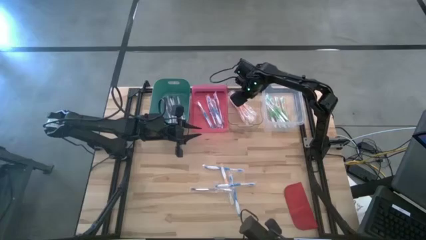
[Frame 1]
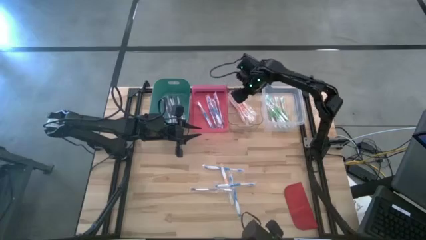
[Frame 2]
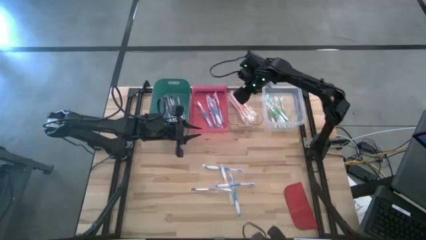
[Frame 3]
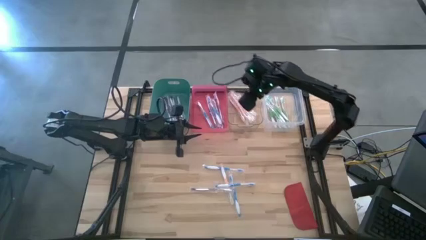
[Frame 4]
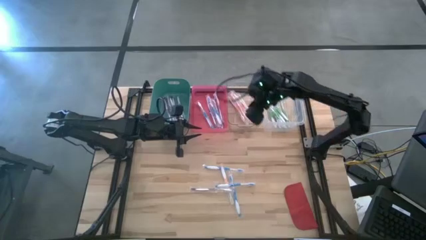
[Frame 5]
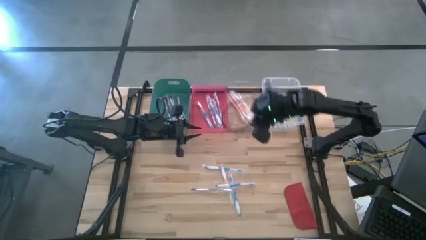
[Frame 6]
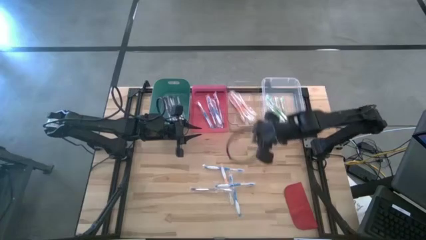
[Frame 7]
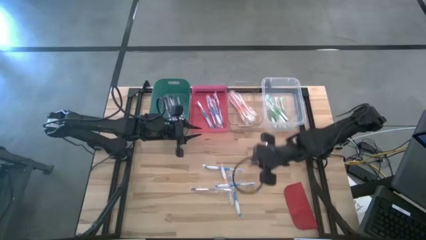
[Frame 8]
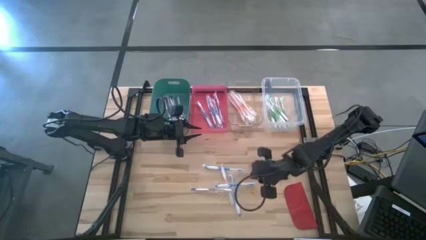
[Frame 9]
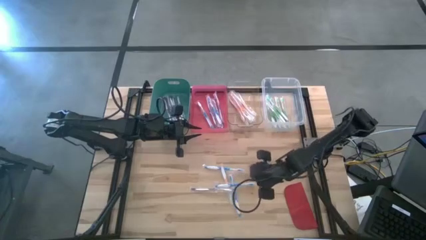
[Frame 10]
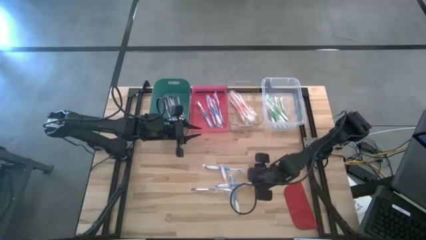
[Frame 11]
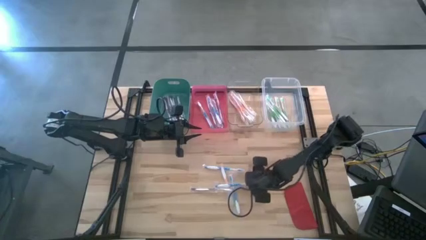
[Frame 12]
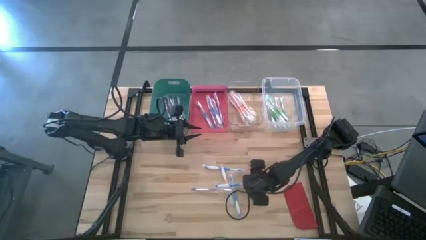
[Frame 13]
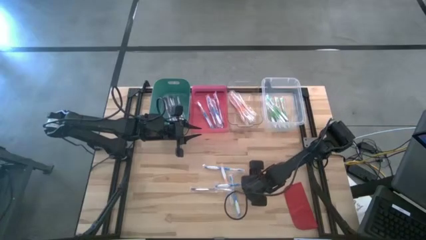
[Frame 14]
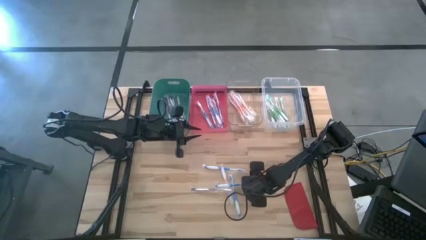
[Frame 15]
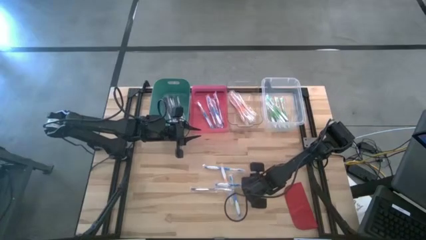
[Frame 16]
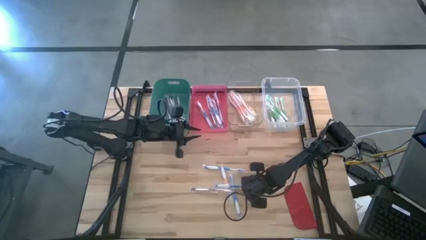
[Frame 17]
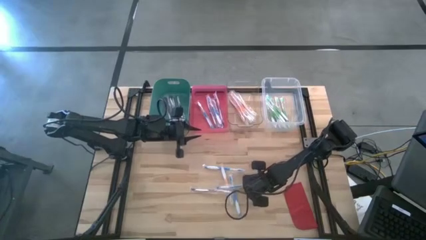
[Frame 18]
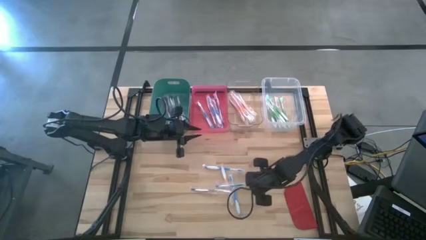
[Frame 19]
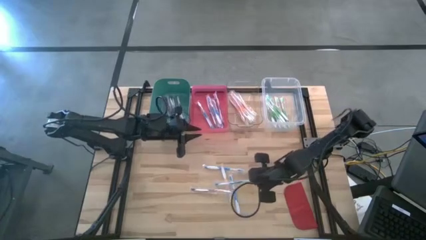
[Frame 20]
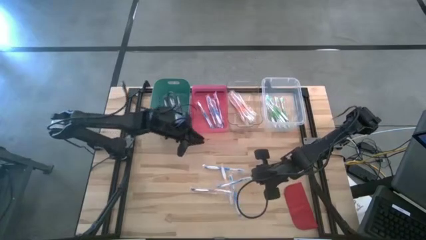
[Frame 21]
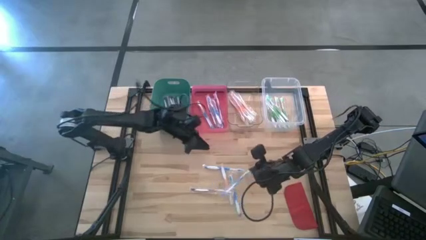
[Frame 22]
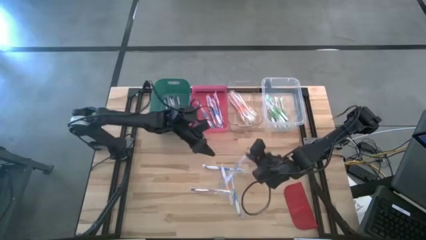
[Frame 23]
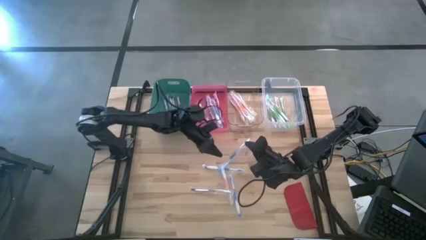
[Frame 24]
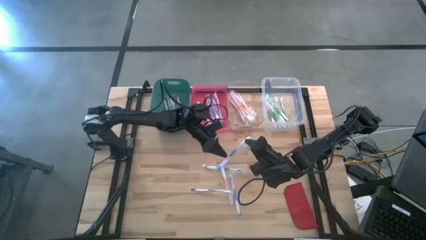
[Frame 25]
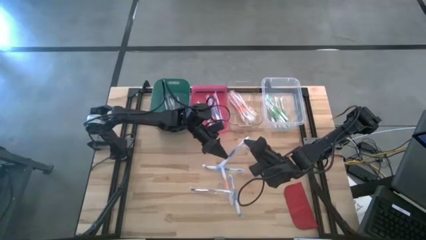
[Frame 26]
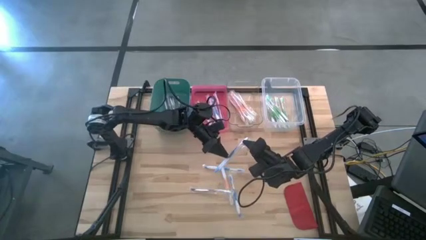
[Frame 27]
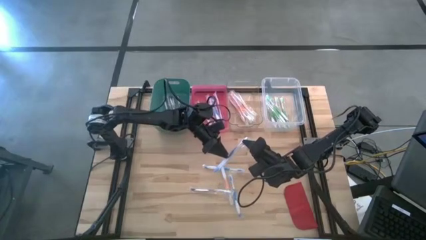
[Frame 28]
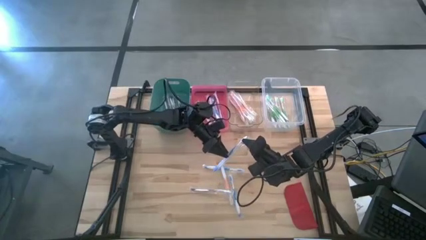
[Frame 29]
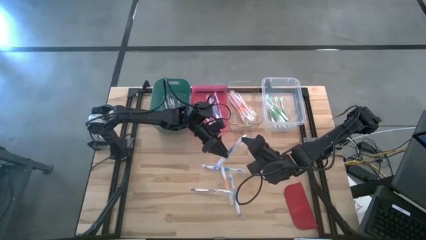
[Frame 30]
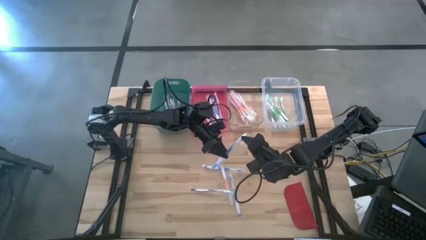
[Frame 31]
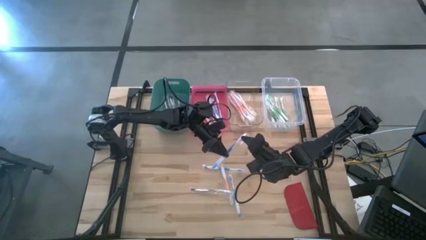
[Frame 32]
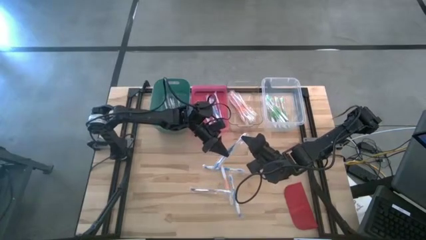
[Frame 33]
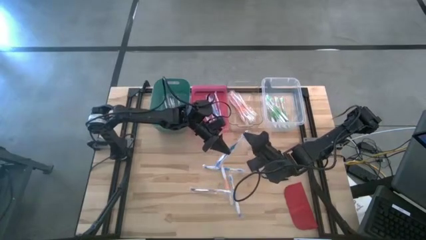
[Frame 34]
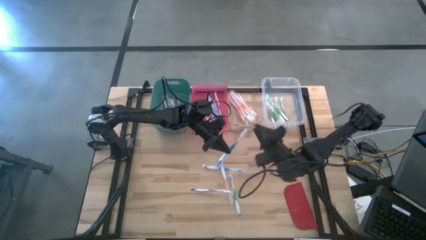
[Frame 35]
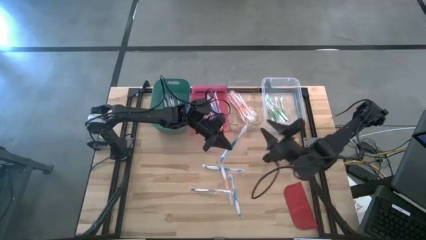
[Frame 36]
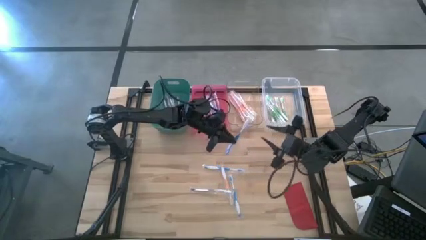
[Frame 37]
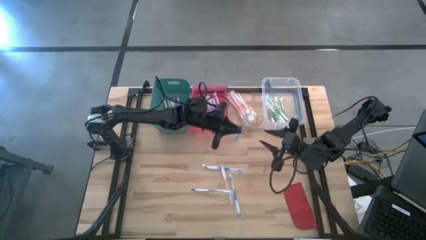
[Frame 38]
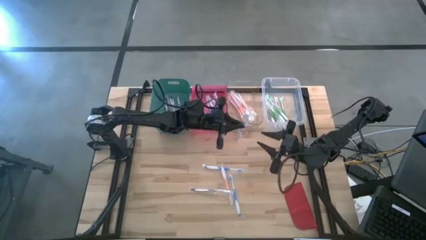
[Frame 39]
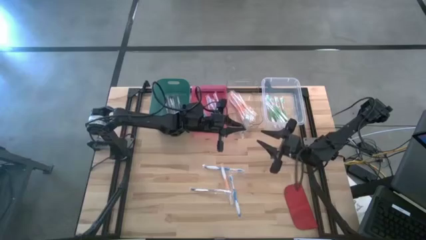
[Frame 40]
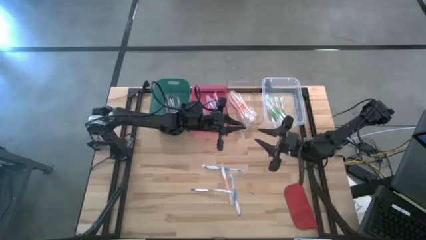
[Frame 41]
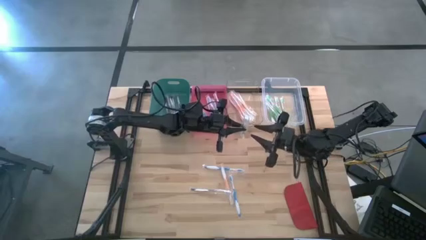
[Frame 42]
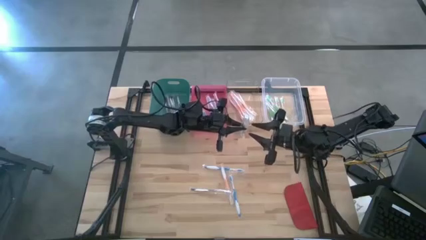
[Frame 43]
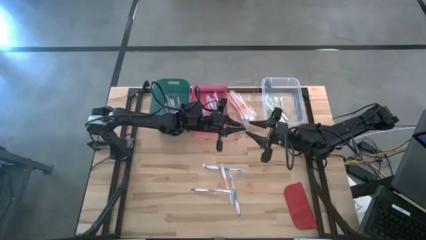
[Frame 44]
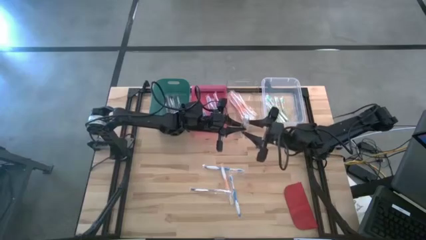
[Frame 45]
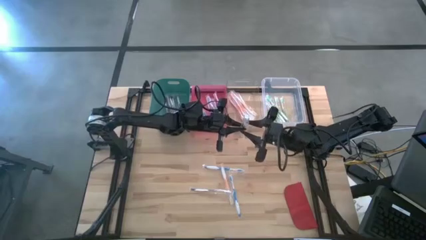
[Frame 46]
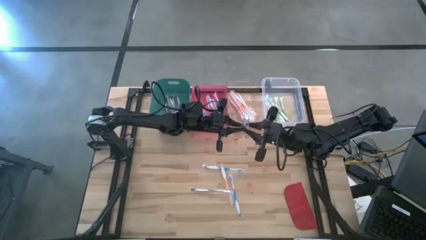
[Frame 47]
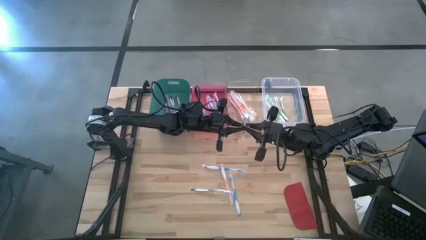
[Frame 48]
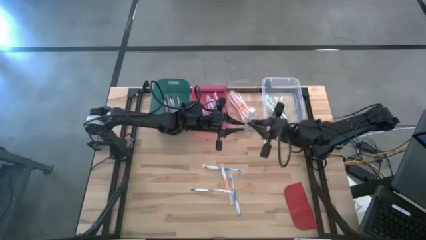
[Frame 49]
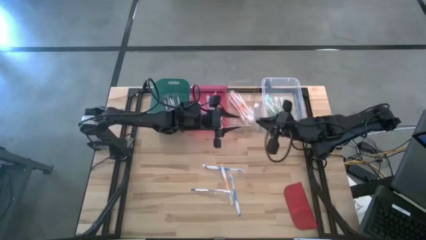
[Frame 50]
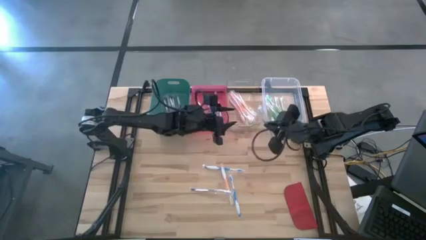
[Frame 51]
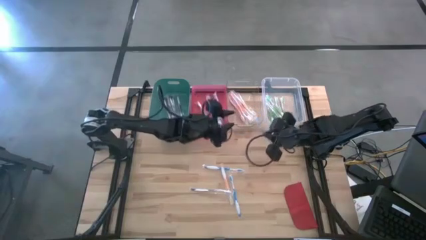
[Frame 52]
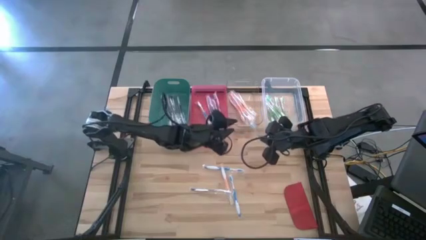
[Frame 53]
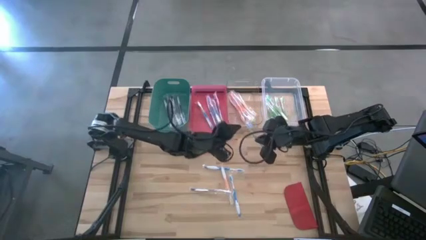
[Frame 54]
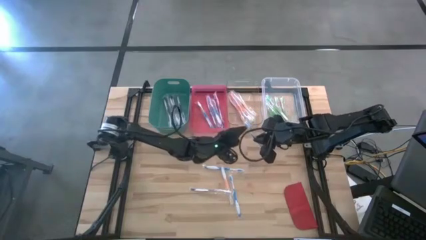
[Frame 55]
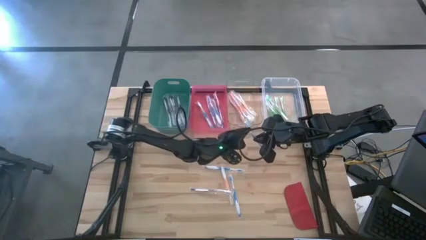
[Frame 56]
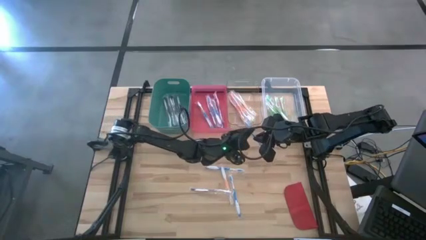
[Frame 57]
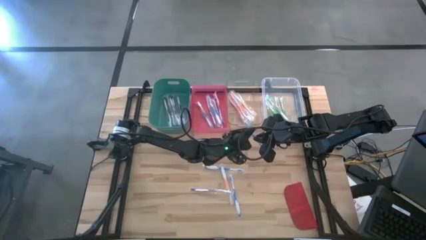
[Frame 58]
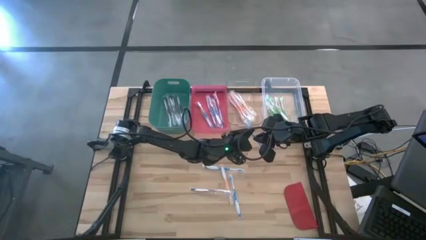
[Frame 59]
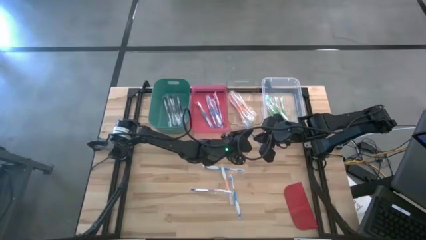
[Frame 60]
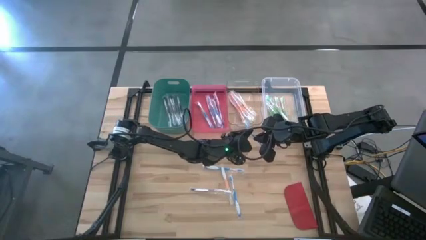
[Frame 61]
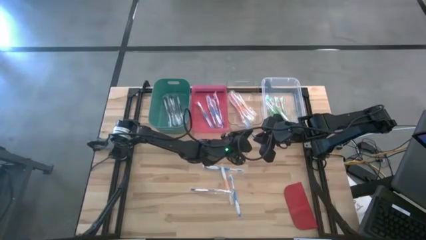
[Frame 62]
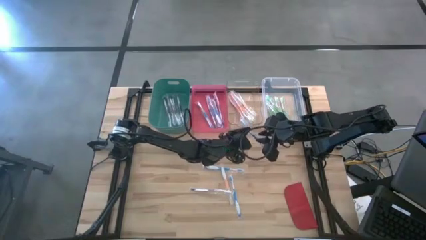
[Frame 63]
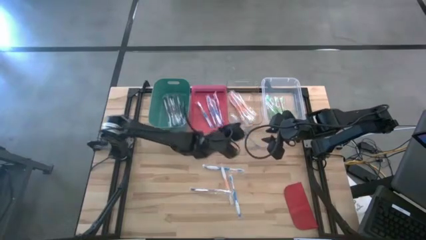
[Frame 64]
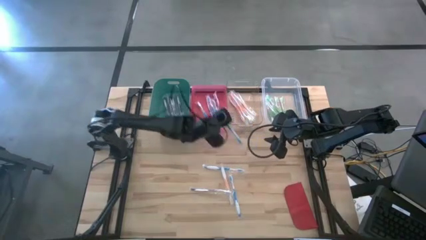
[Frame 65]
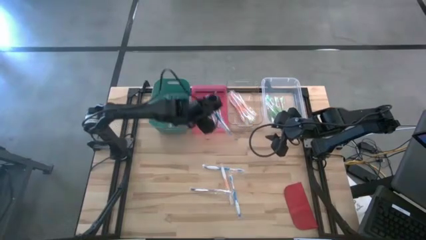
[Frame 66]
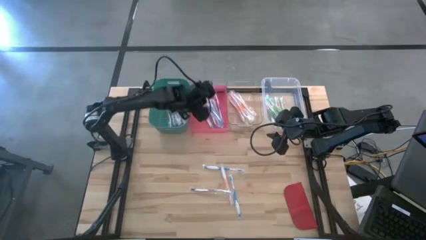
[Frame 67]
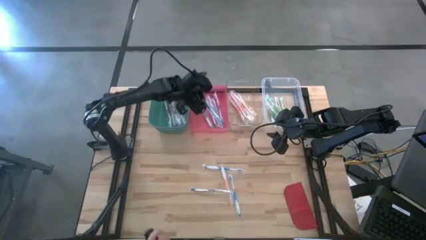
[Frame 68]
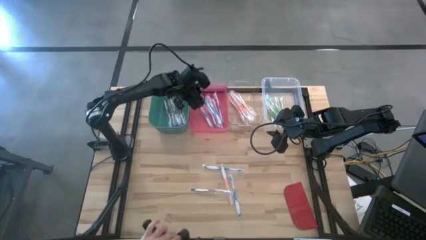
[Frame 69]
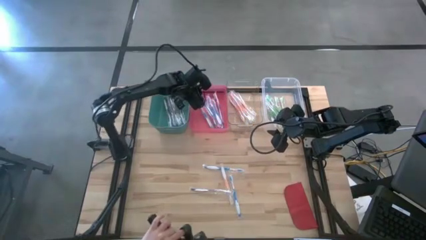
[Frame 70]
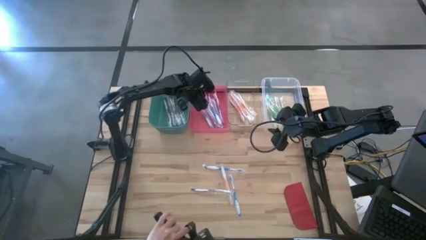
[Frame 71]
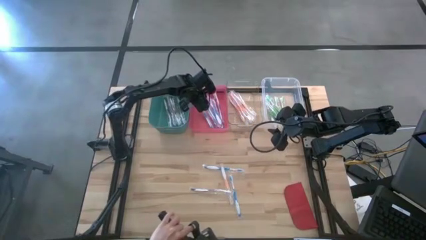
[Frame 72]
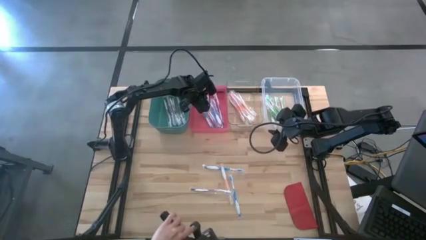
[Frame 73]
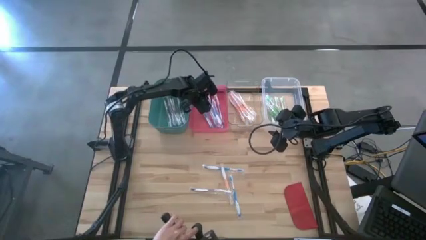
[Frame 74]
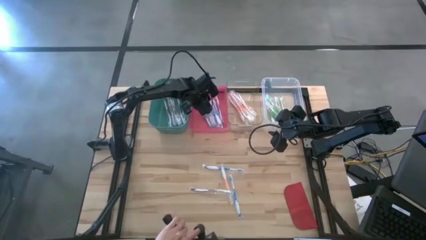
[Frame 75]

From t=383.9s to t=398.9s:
Task: Pick & Place Toothbrushes
Put the blue toothbrush into the red bin

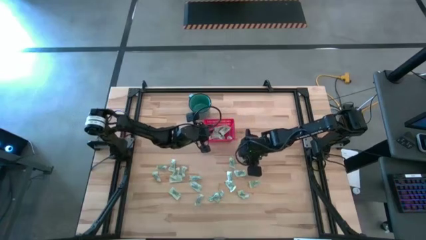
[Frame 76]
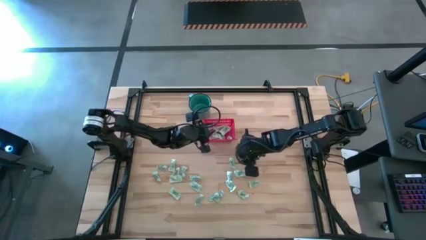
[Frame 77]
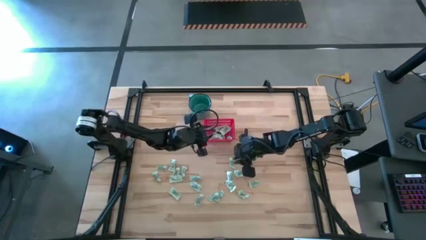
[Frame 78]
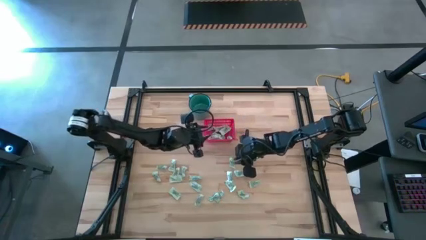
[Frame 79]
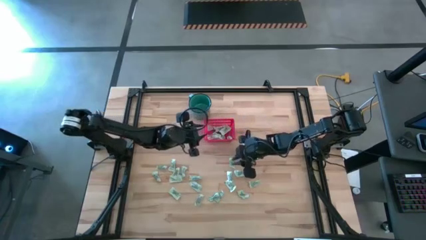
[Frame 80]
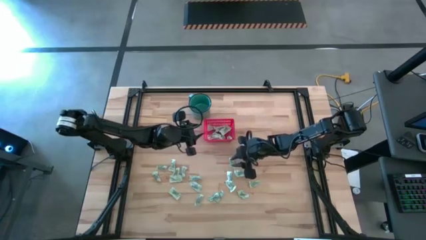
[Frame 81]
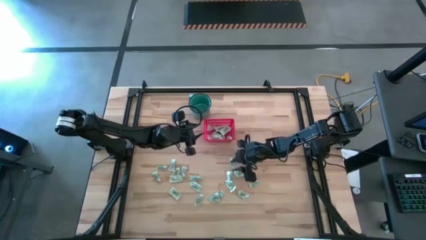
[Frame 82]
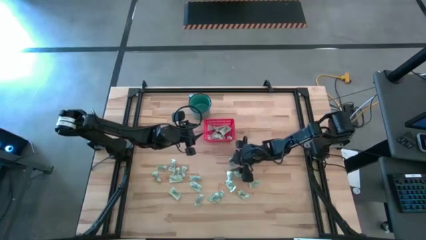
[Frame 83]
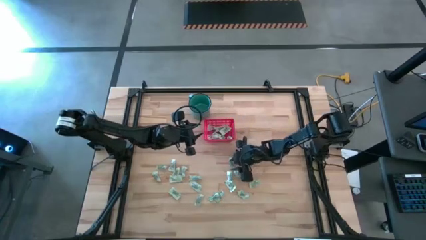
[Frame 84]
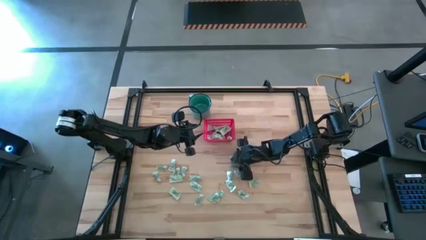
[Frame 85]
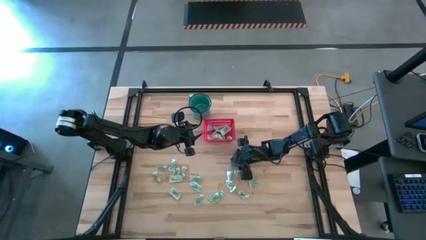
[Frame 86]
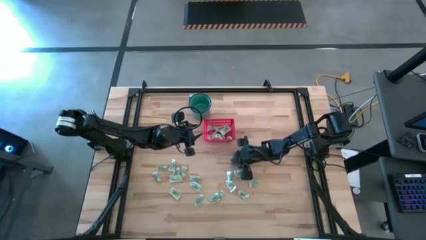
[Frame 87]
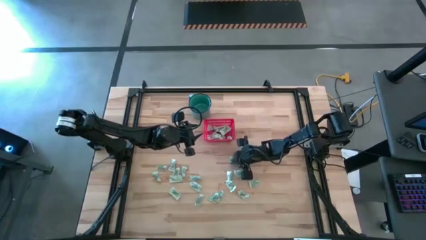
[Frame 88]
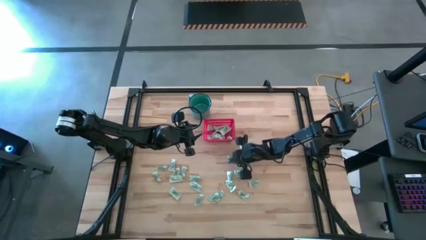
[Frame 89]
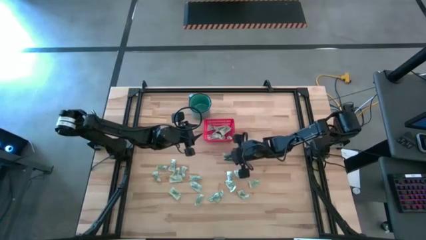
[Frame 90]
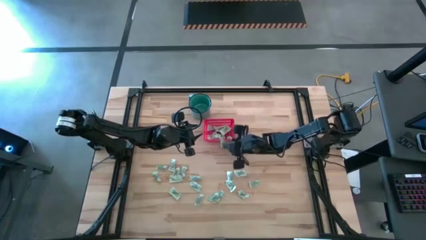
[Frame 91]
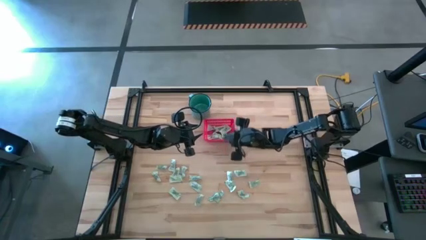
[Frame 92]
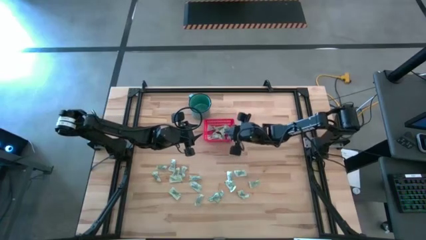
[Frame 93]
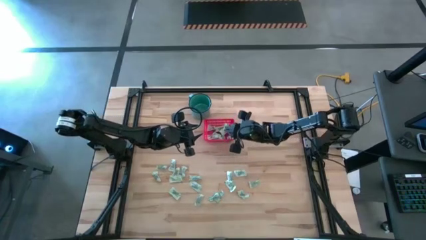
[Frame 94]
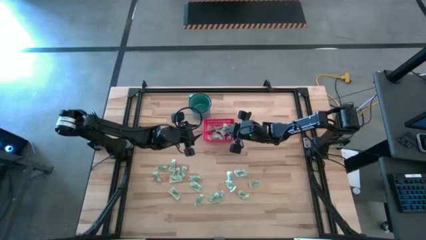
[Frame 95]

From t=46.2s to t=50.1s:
Task: Pick and place items into bin
Put the light green stevia packet into the red bin
